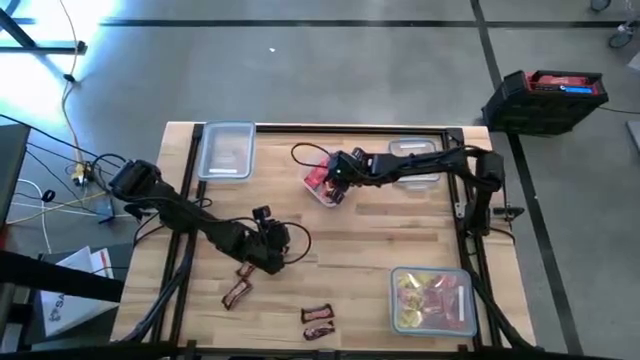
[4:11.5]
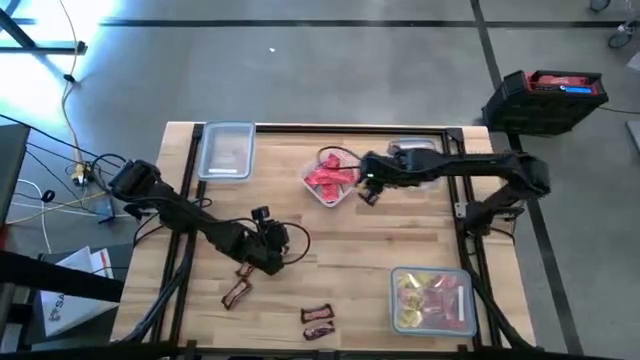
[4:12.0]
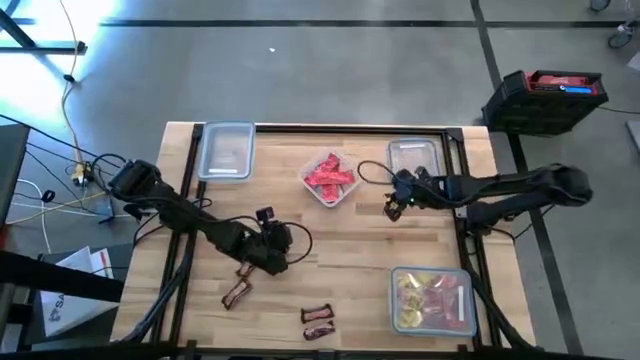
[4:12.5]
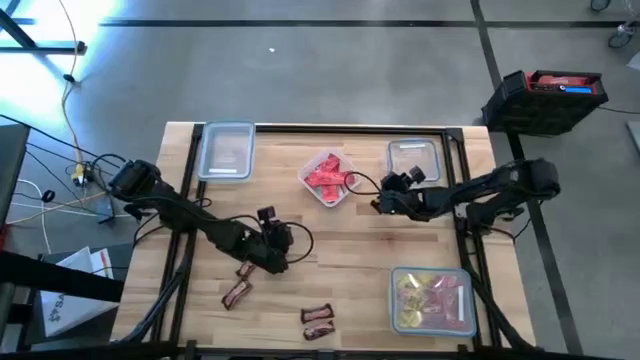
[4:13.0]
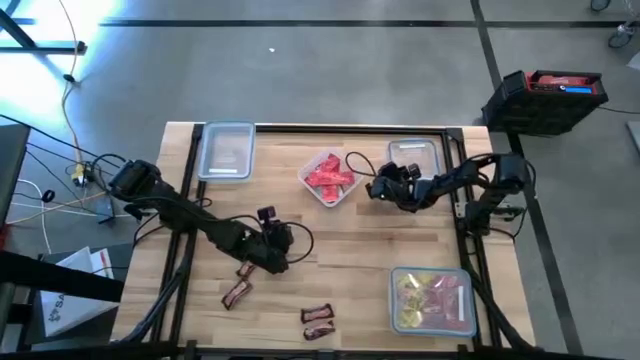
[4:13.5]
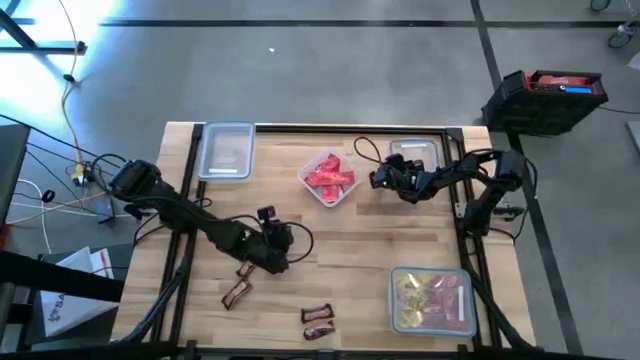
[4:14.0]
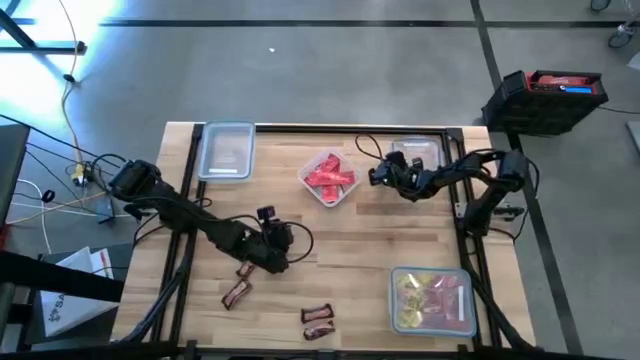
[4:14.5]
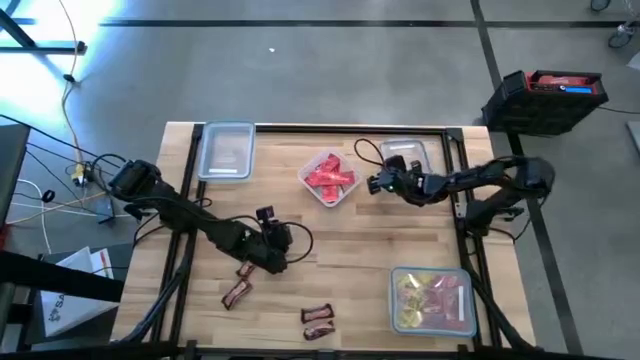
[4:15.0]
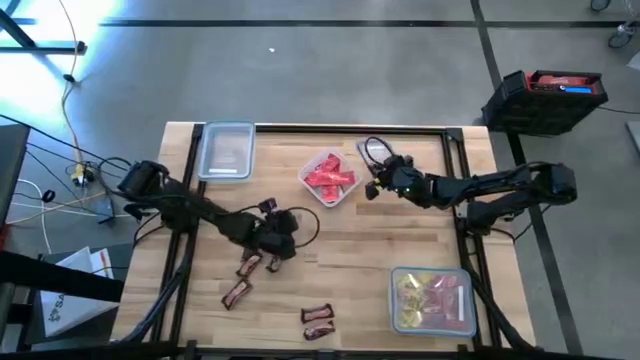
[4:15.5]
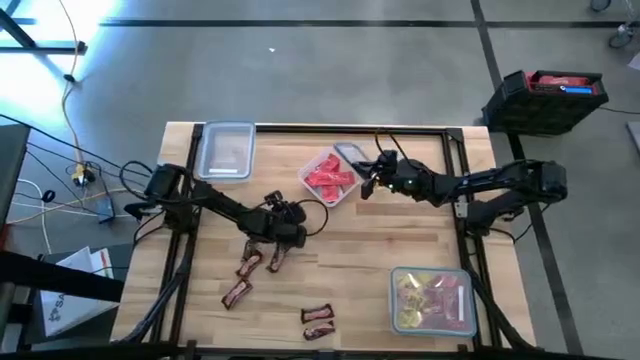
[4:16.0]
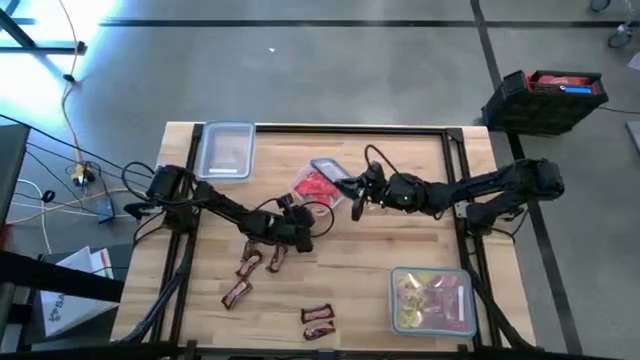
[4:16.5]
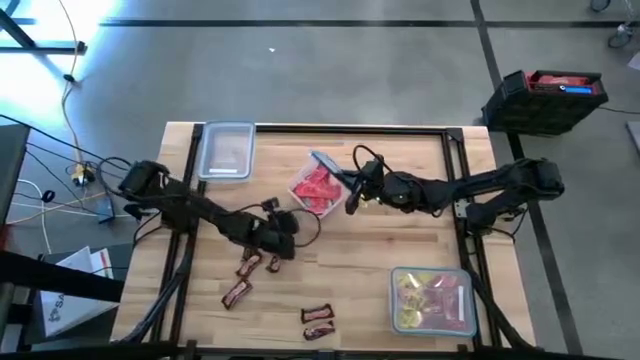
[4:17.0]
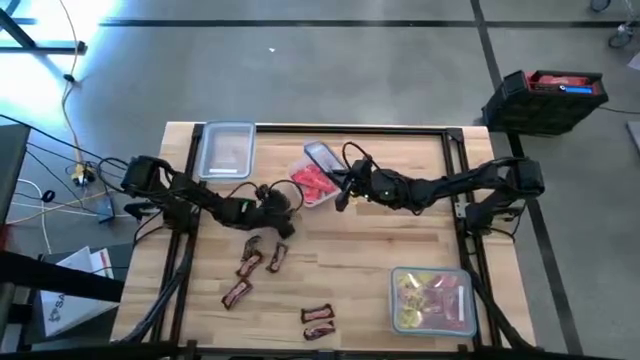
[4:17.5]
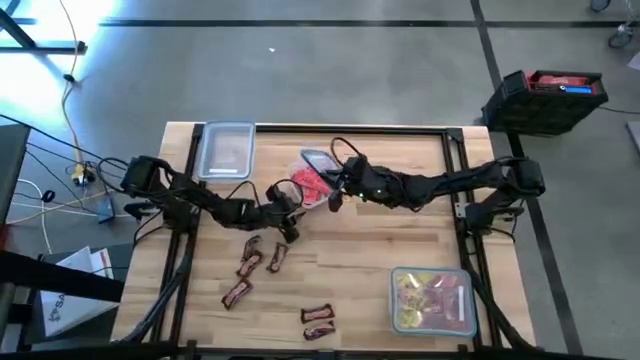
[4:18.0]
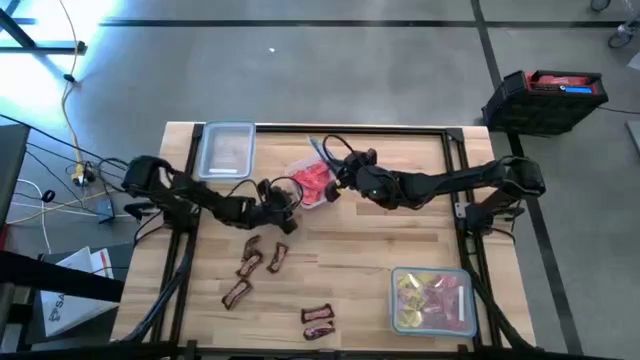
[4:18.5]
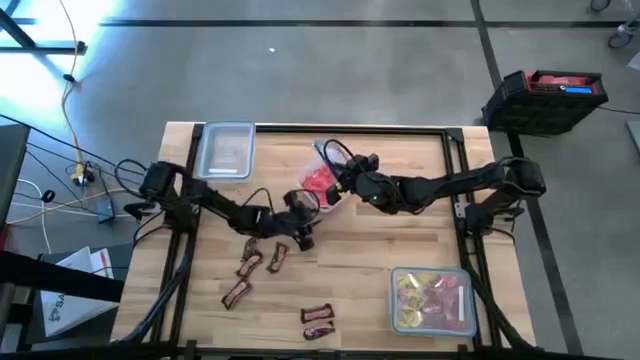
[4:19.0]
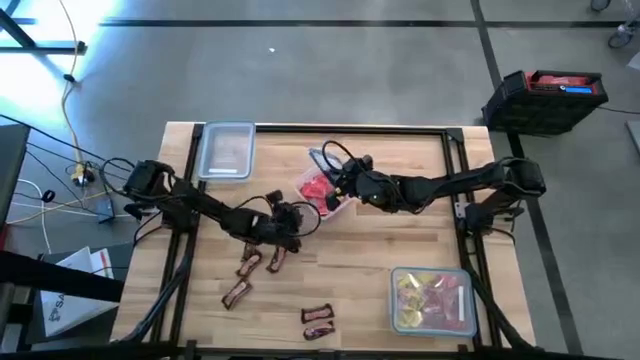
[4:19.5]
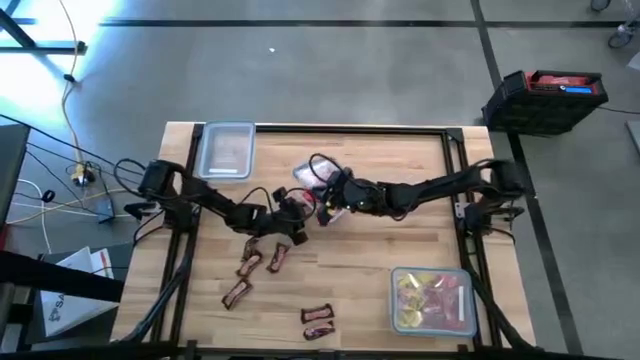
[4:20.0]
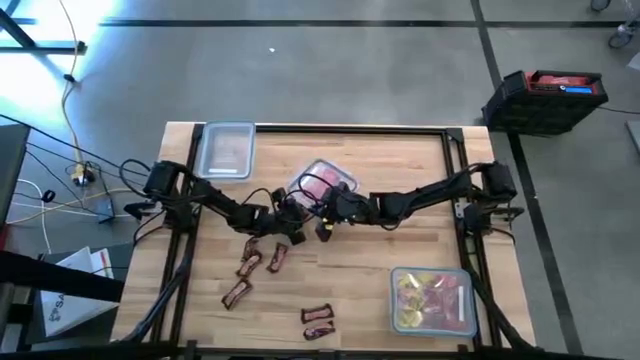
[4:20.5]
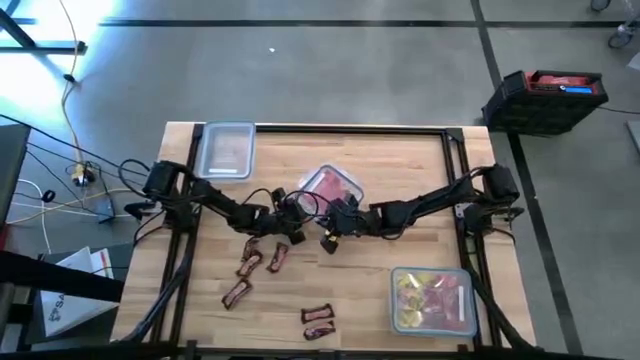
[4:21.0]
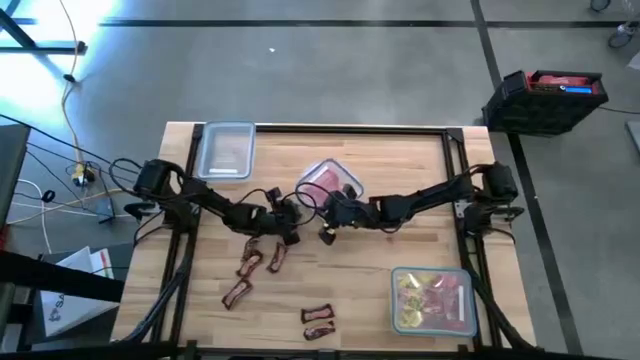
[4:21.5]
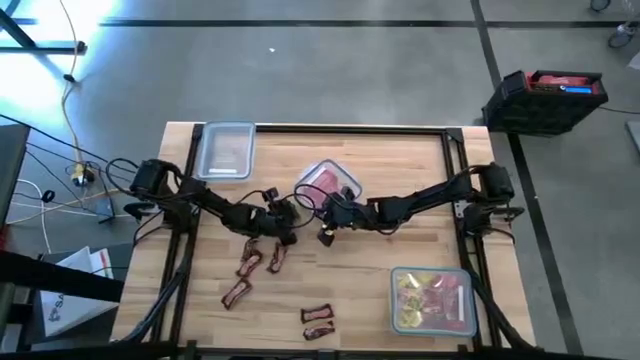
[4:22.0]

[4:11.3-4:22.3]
Task: Sort candy
Close the transparent bin

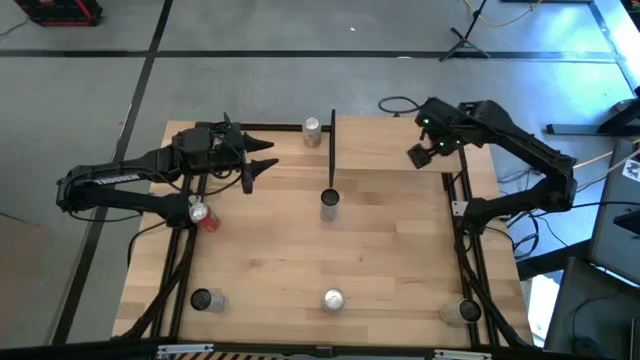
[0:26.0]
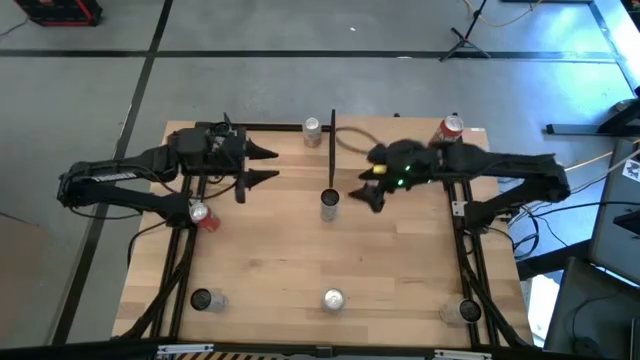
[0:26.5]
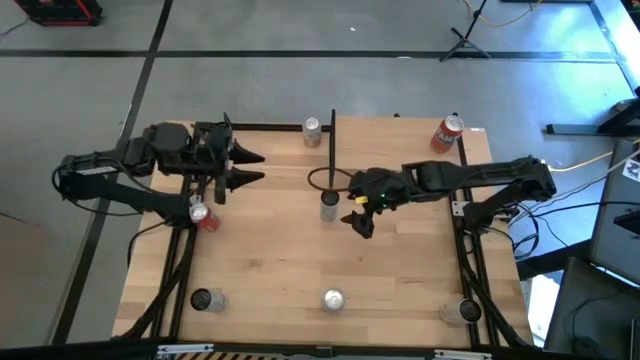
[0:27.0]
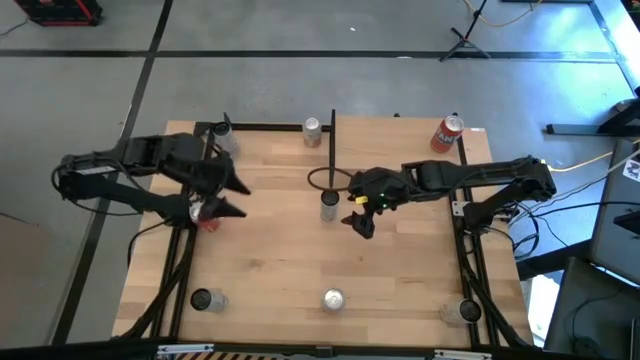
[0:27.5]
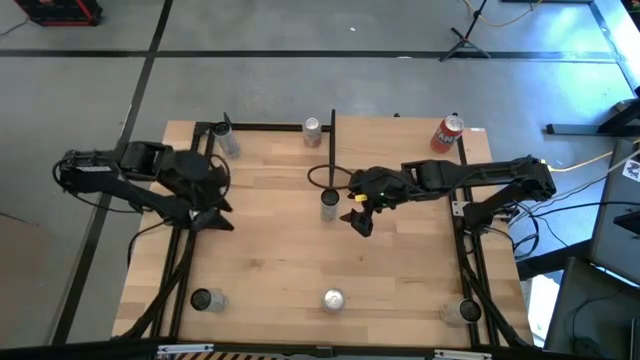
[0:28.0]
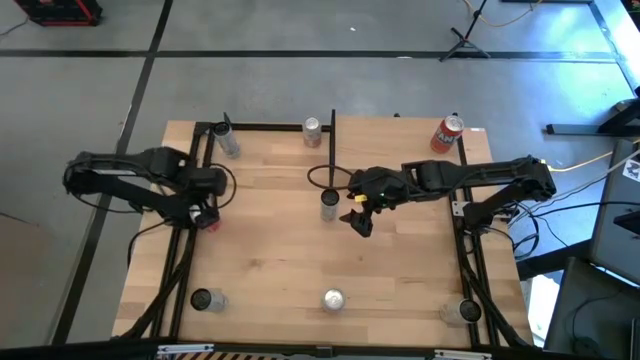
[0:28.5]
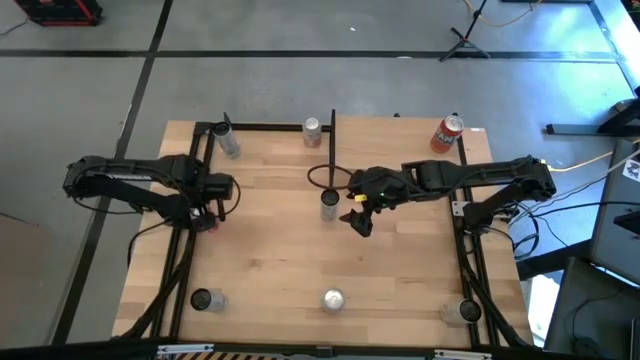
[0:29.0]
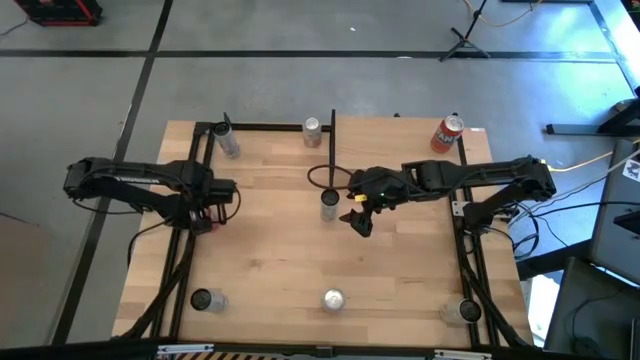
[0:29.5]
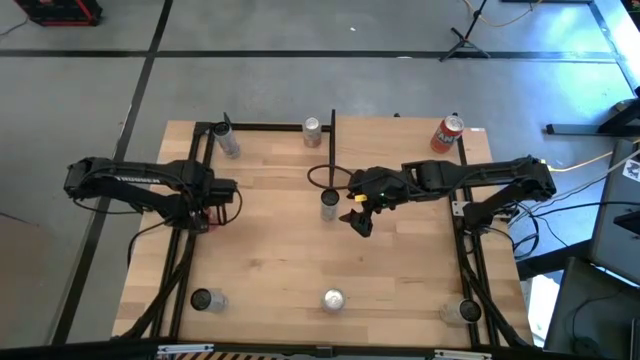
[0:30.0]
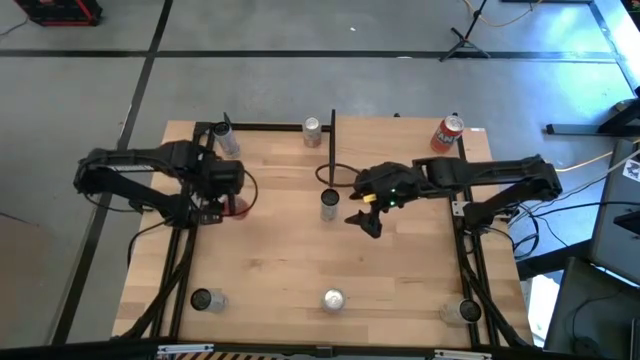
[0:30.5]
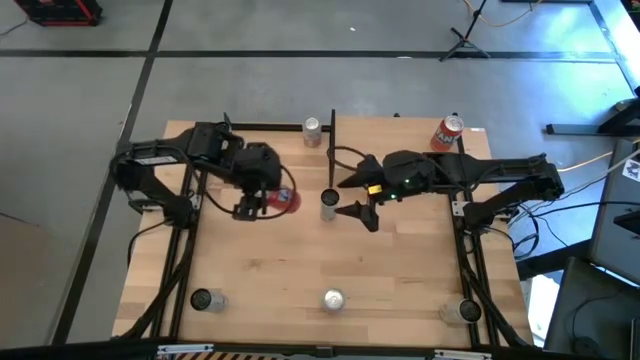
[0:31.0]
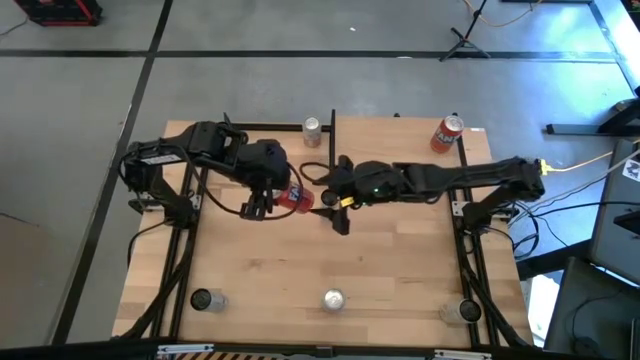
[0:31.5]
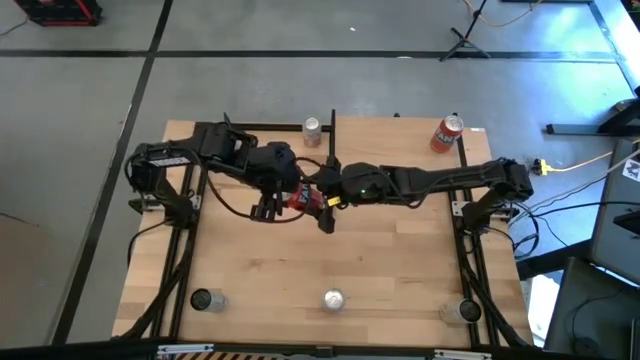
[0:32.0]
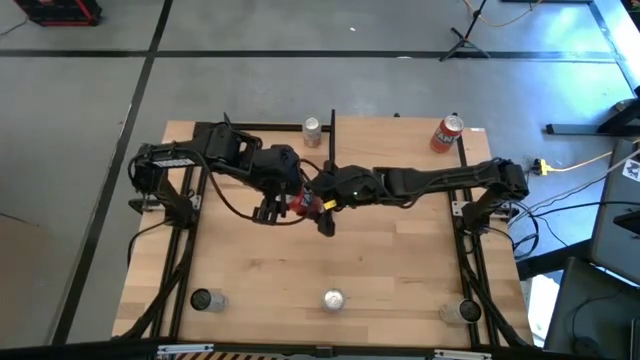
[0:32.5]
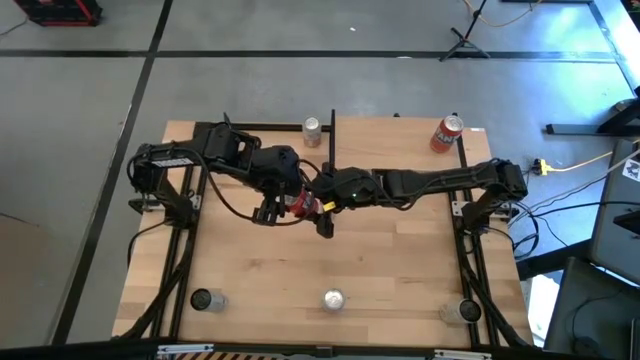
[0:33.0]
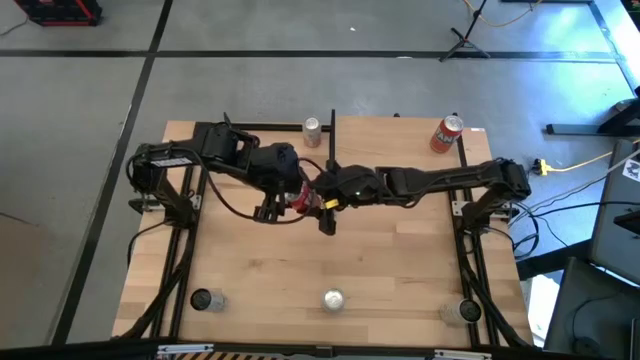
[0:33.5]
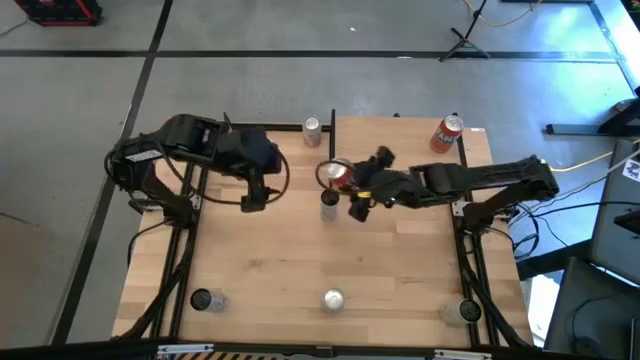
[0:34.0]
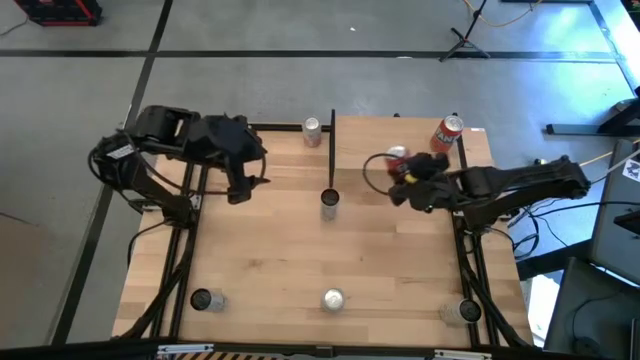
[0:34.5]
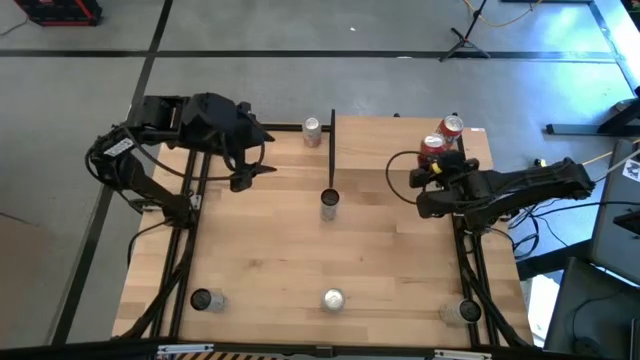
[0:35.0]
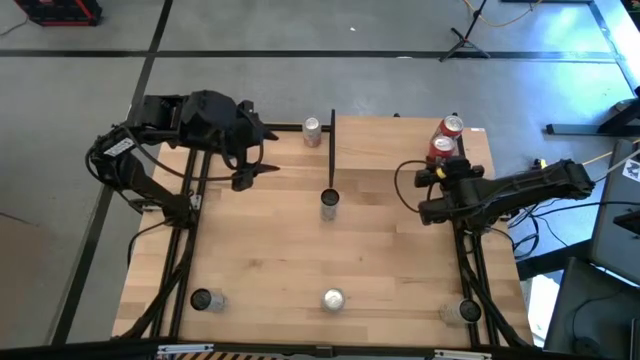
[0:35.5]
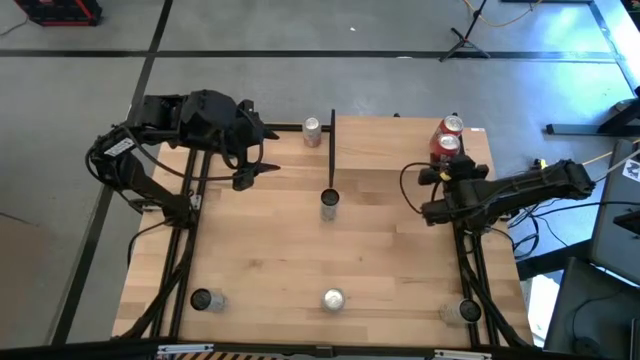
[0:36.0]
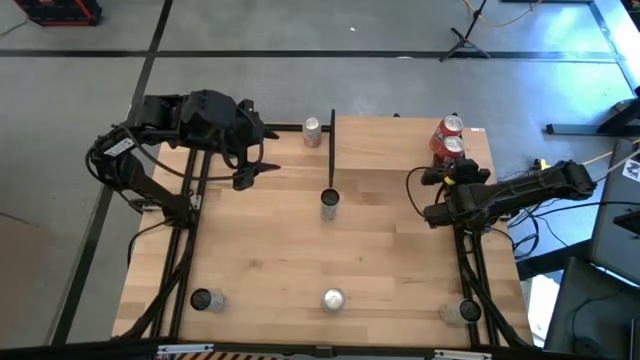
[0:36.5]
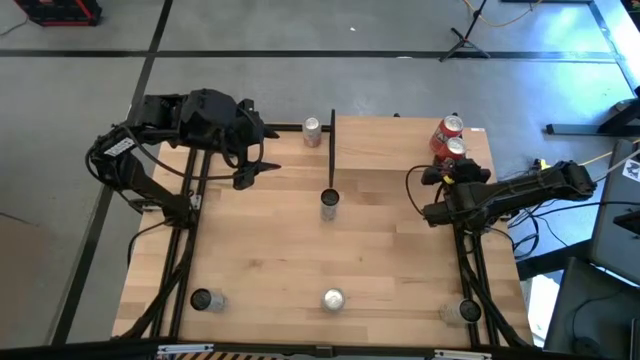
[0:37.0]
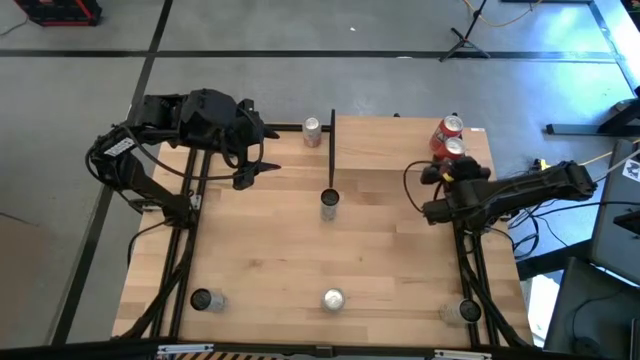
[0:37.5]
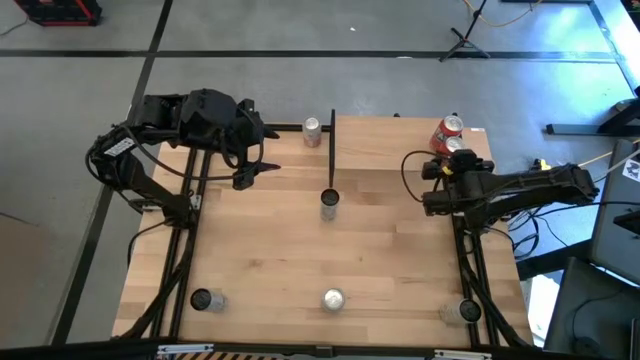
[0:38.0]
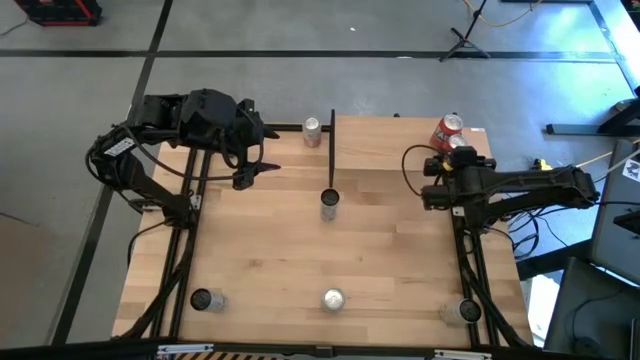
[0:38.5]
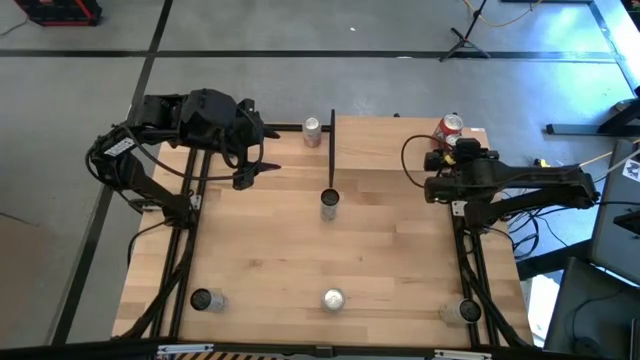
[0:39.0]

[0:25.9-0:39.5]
Task: Place canned beverage on shelf
Put the red soda can on the shelf aligned with the other red soda can
